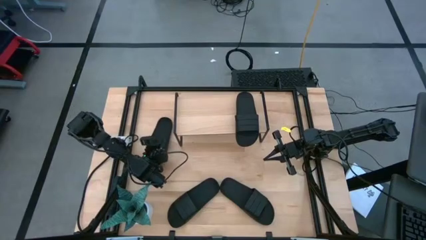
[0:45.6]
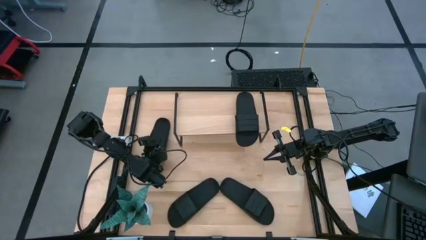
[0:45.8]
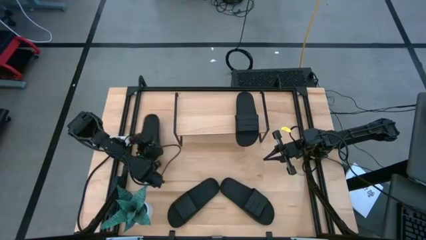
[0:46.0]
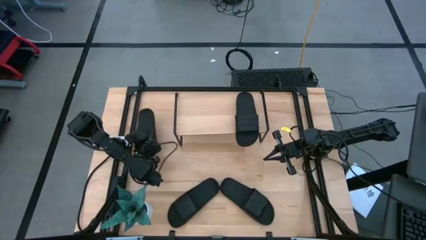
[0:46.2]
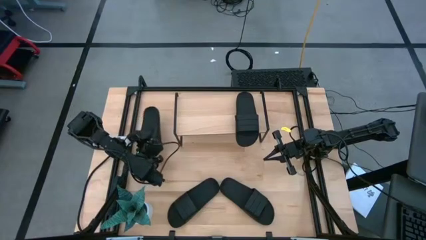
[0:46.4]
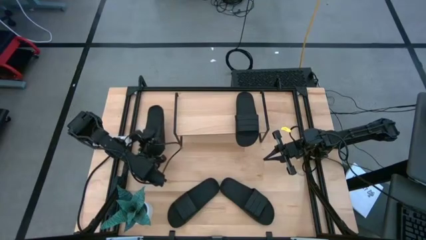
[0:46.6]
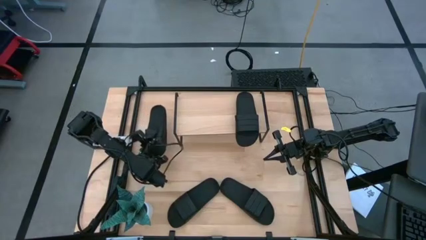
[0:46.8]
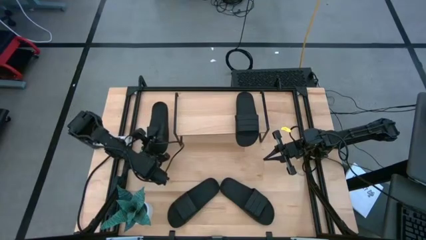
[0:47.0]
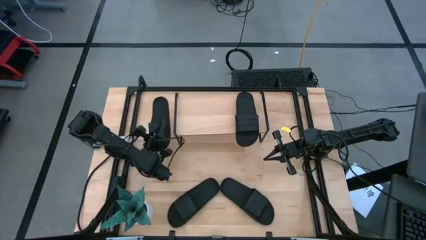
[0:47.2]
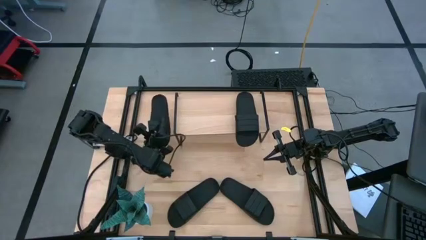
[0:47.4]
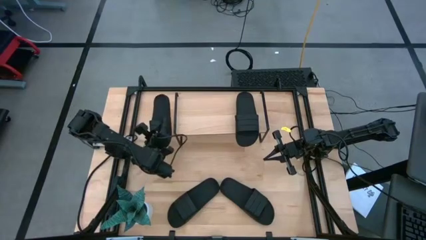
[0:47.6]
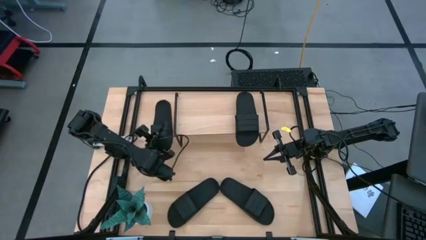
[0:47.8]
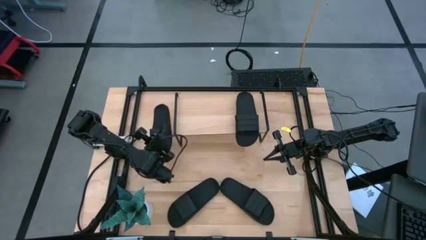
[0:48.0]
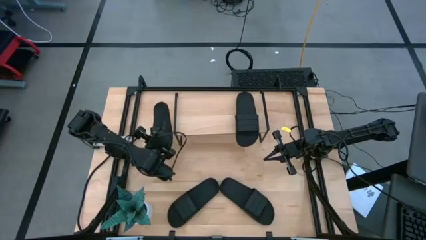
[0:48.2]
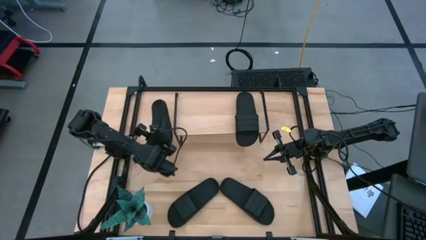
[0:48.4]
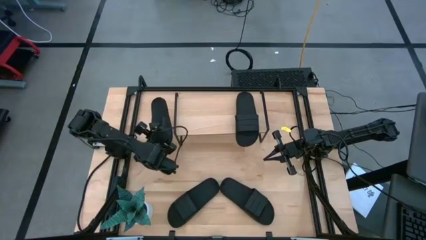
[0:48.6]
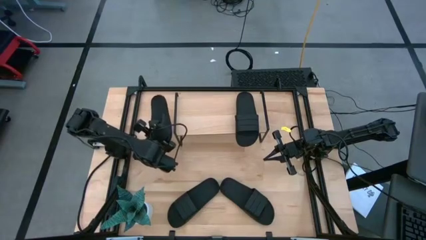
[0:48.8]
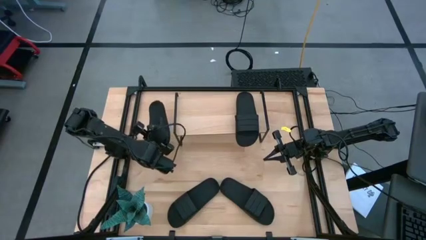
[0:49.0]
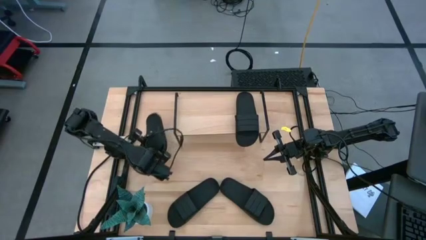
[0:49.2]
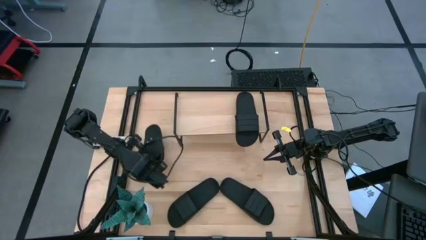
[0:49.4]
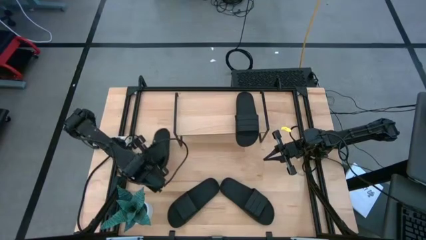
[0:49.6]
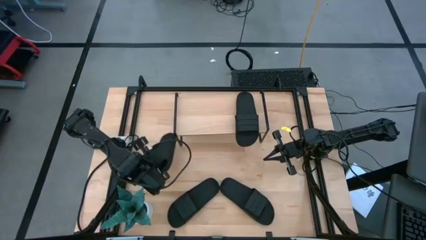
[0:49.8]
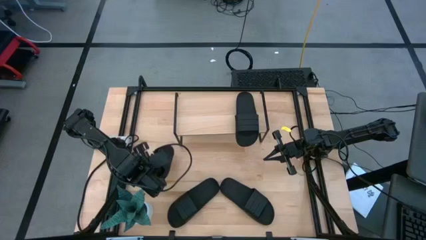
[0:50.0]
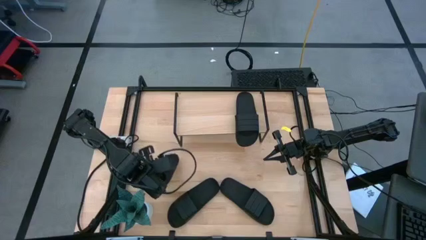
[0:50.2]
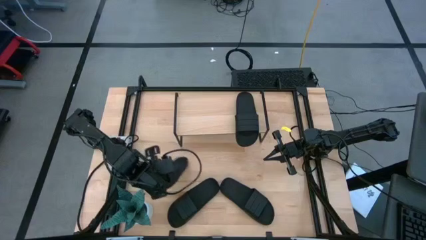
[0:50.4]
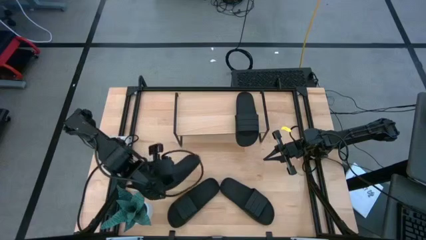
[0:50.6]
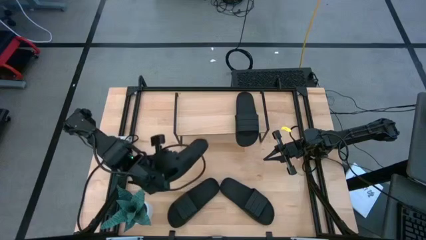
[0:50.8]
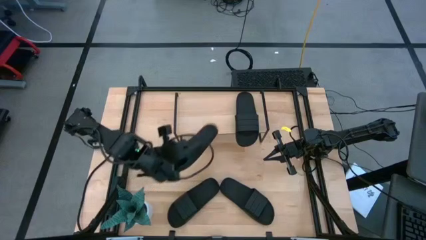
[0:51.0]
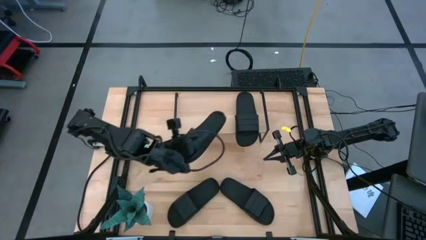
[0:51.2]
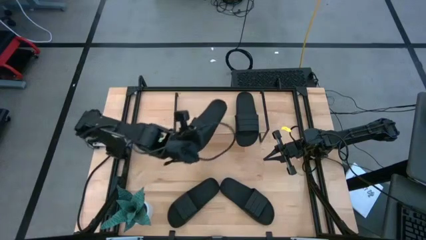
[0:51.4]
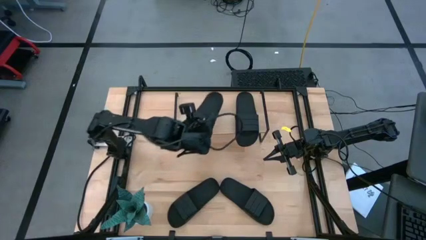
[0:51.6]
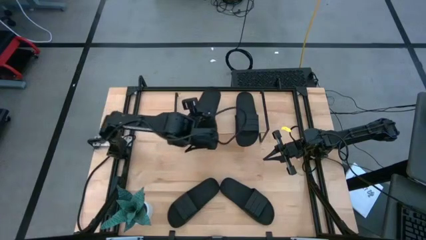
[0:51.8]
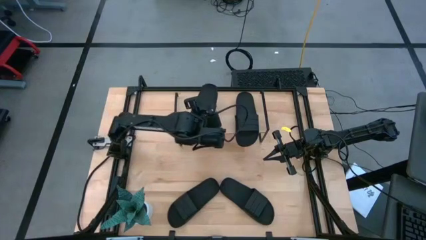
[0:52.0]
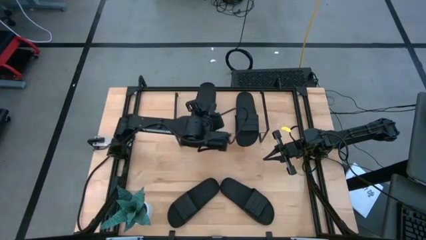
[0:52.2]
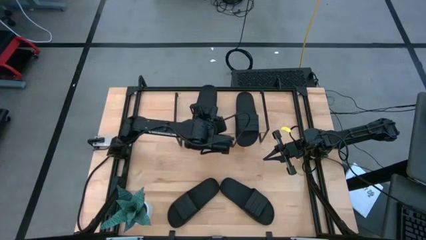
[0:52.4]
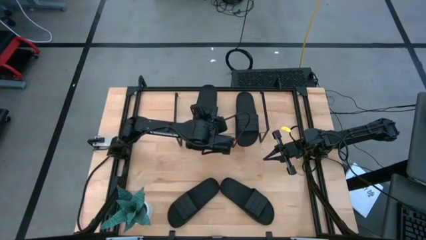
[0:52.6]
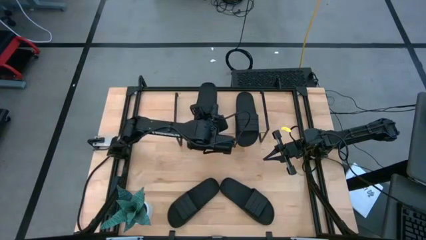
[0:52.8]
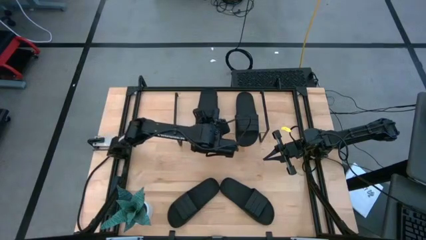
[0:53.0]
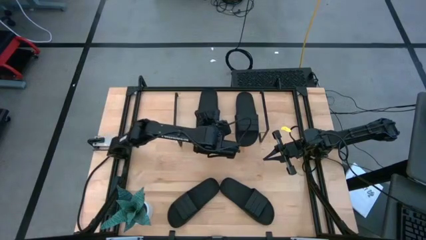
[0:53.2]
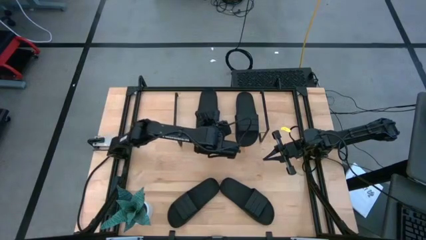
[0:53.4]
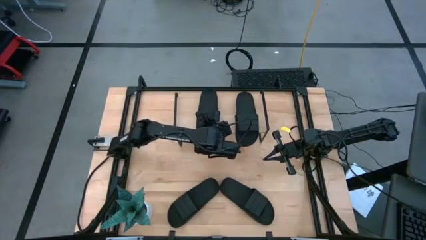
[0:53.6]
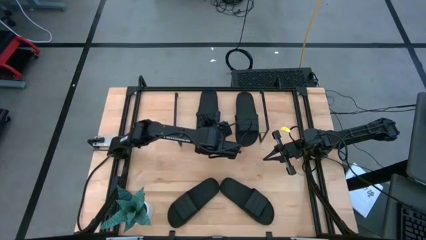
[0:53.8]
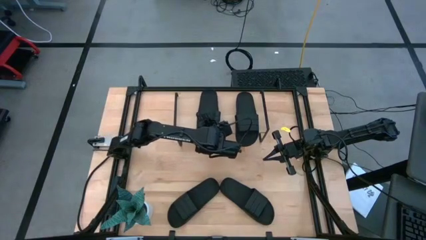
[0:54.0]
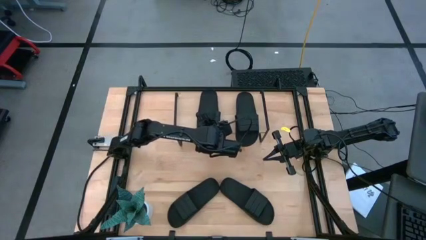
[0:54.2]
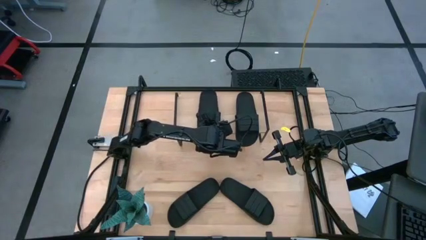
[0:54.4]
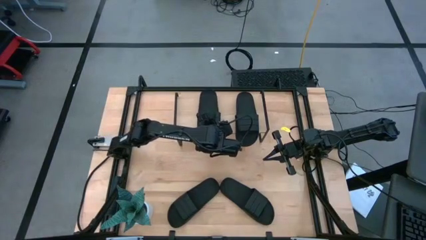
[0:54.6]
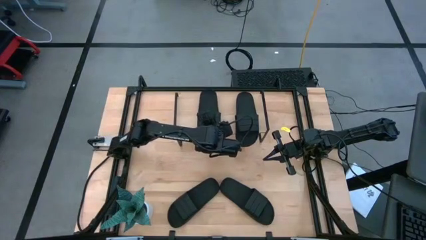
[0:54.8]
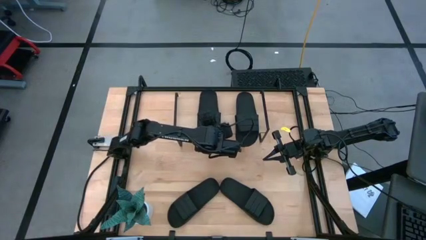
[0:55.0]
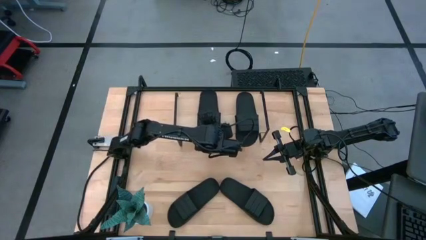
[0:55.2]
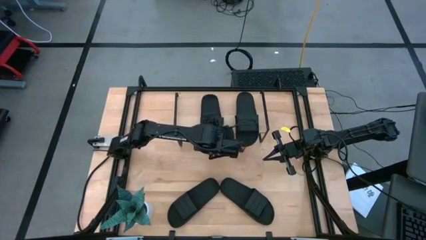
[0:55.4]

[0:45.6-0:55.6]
Task: Pick and place slides into the shelf
Put the top left black slide on the shelf
